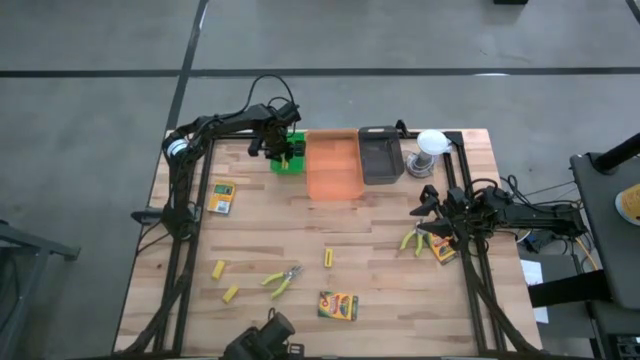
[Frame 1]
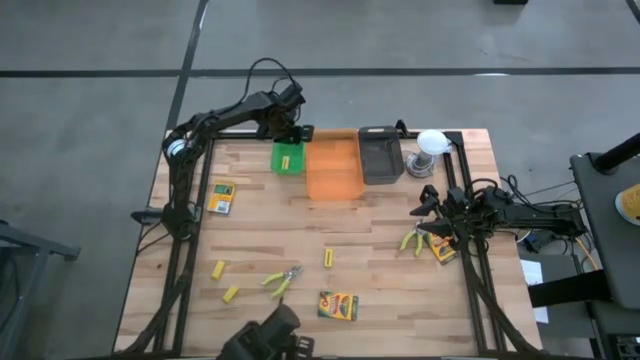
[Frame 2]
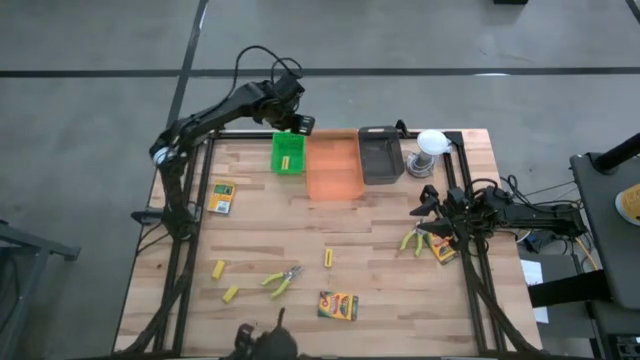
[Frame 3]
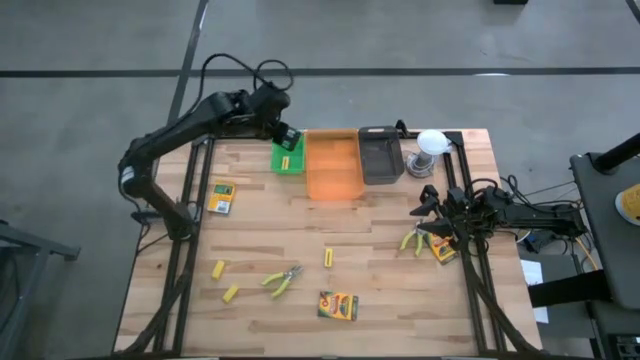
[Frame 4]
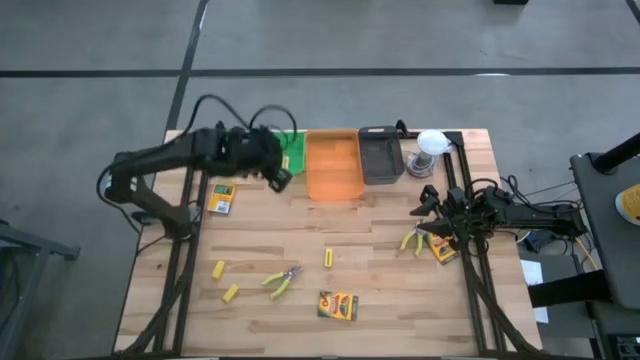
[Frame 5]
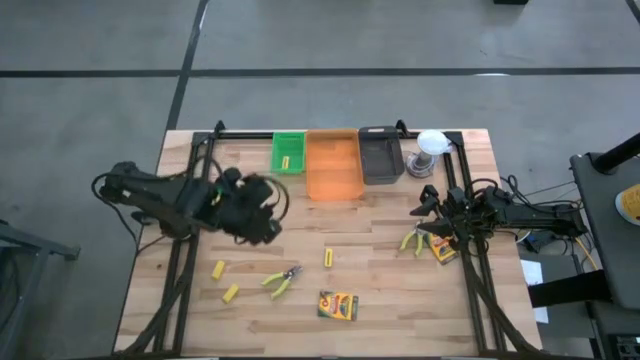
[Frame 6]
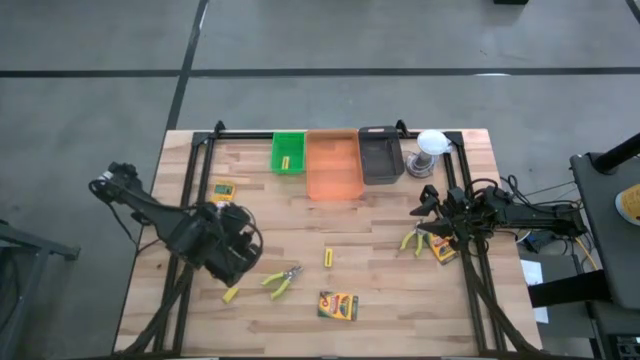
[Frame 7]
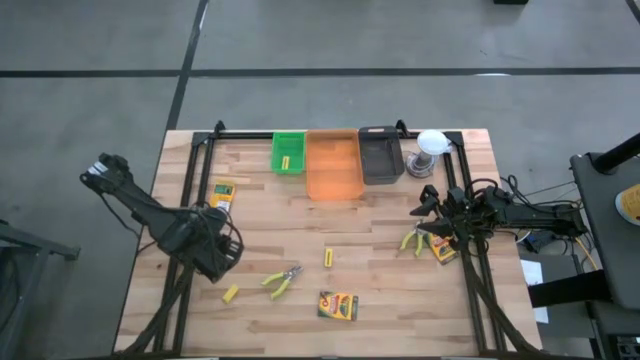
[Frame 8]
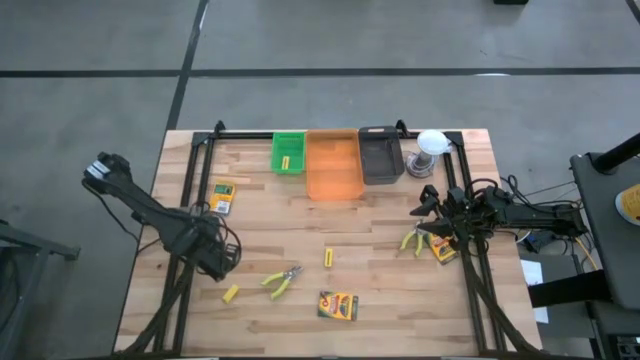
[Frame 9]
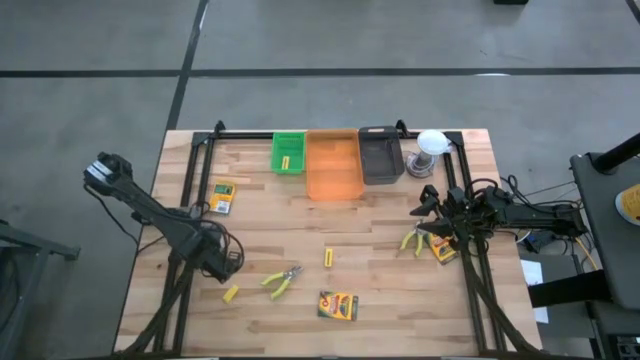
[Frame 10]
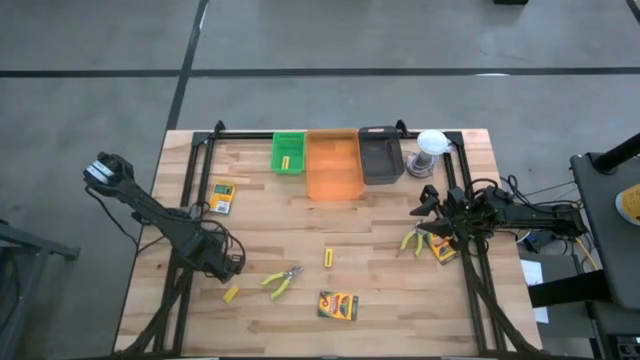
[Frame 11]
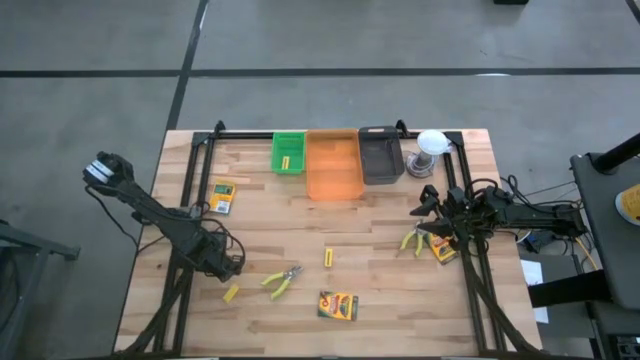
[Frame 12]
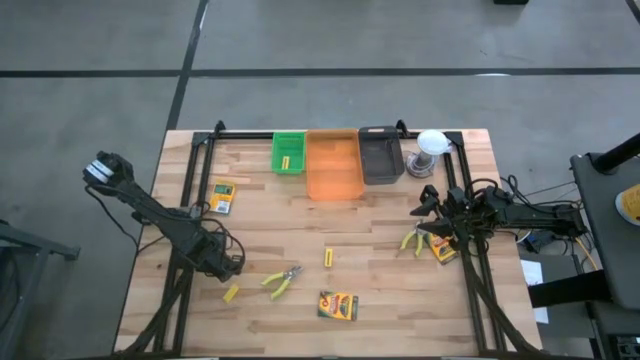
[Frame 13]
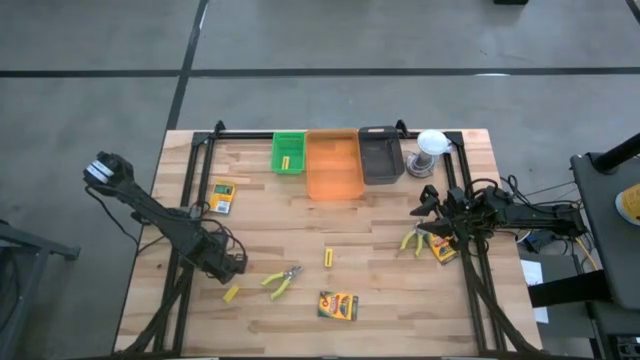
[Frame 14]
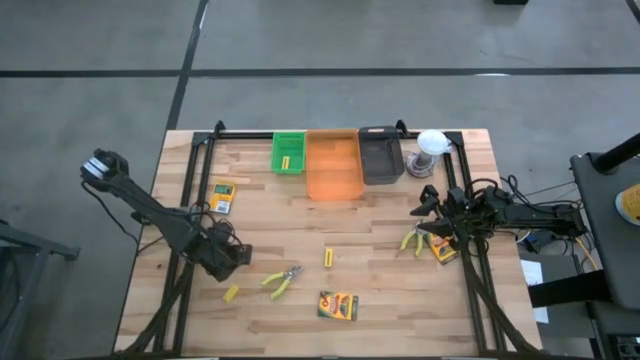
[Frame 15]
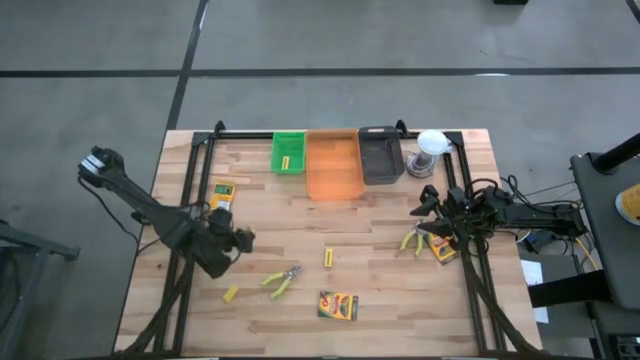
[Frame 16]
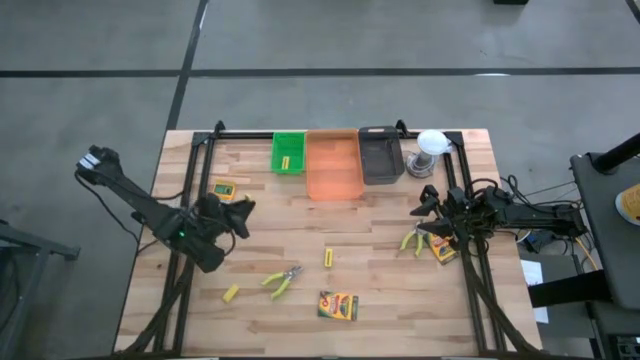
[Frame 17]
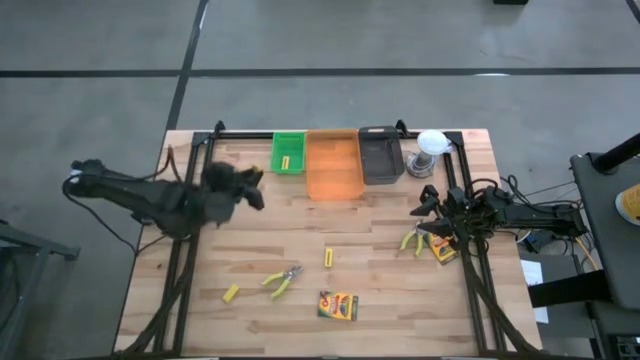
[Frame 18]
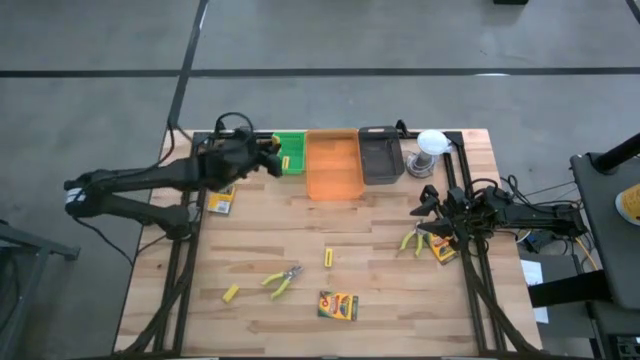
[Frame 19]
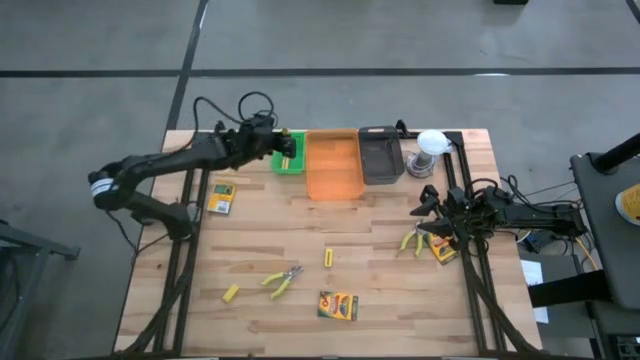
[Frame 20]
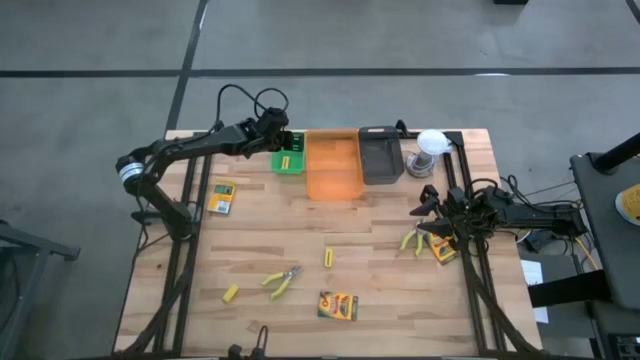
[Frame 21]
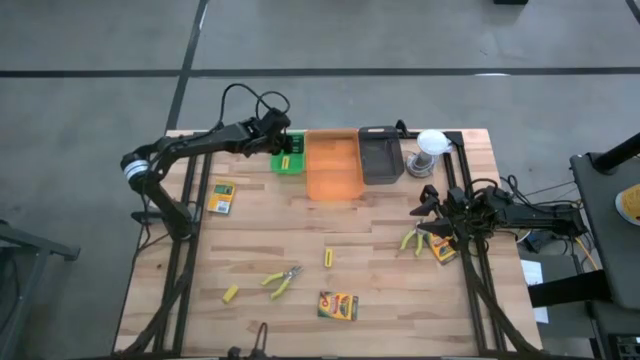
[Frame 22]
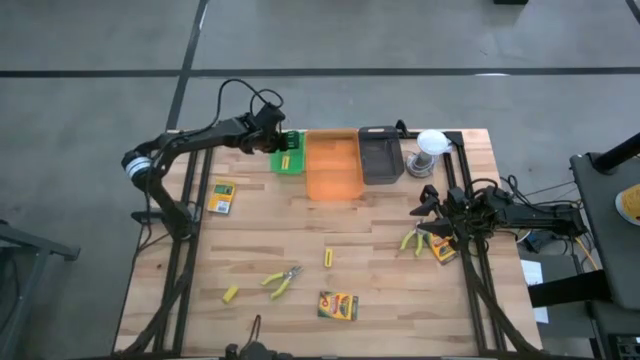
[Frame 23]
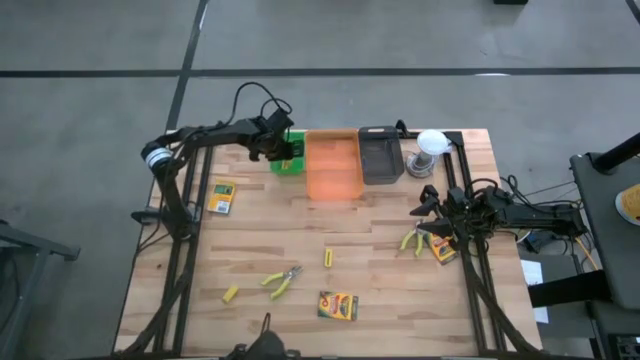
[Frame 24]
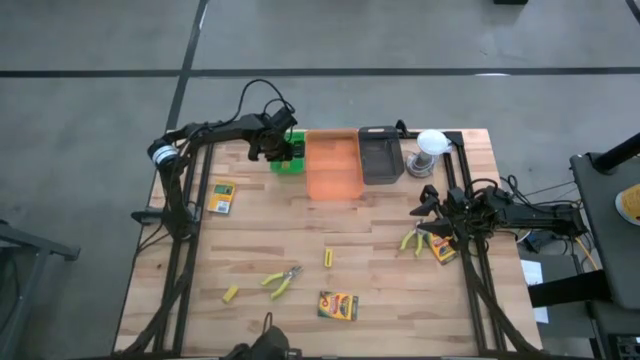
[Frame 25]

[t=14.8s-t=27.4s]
Task: Pick & Place School Supplies
Put the yellow eraser into the green bin
